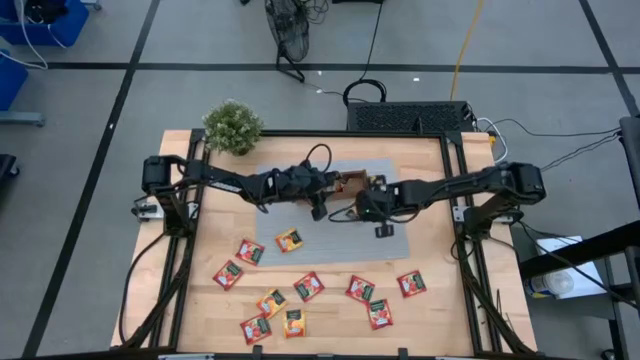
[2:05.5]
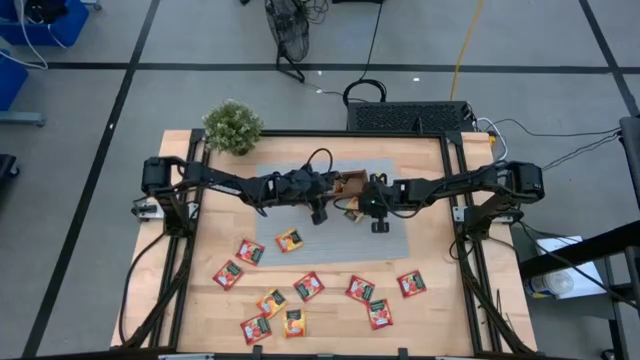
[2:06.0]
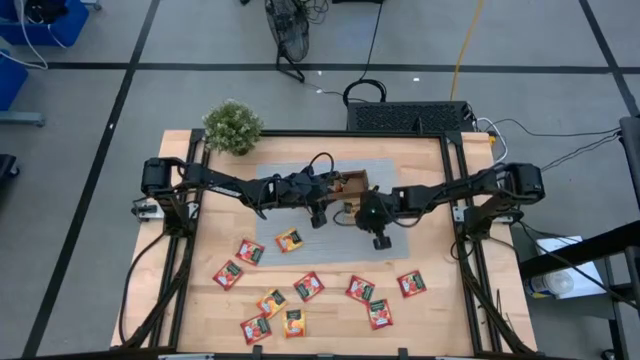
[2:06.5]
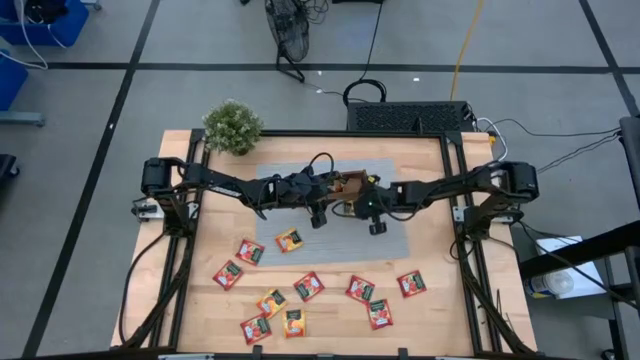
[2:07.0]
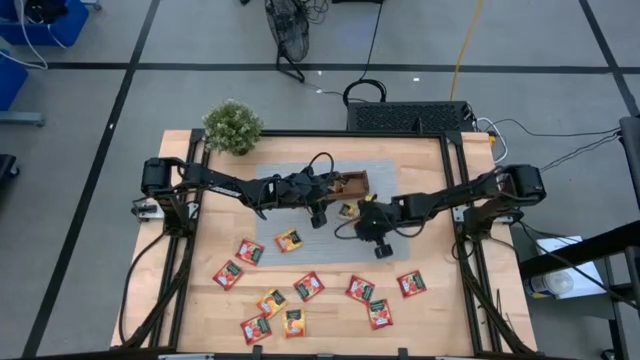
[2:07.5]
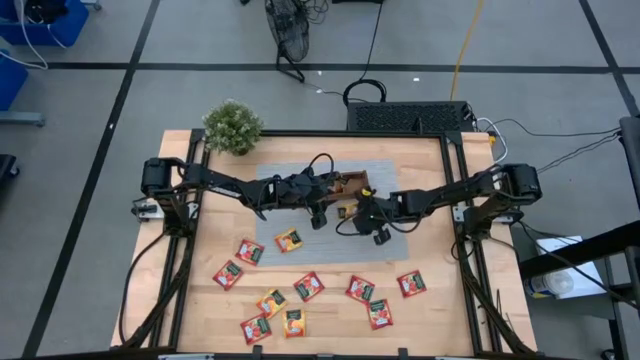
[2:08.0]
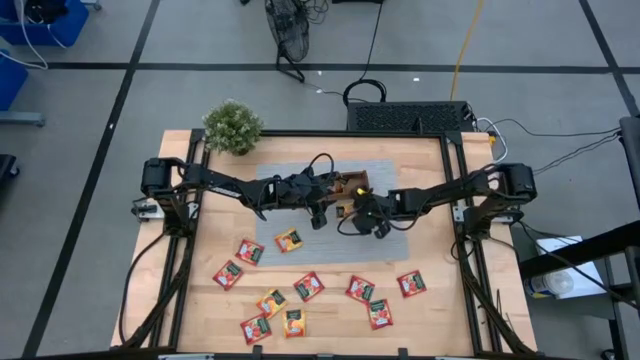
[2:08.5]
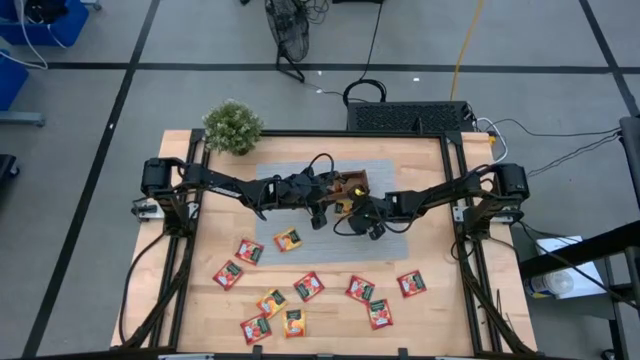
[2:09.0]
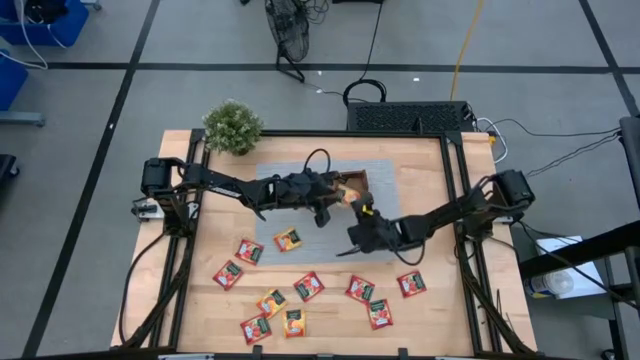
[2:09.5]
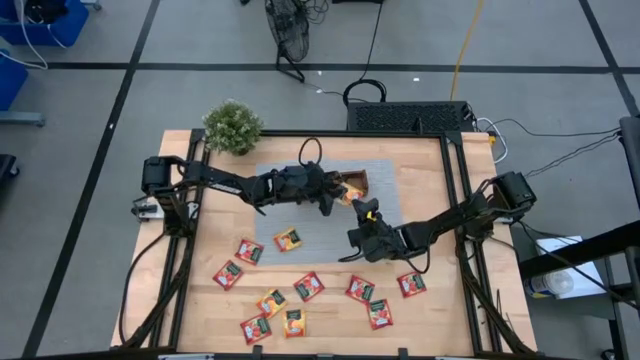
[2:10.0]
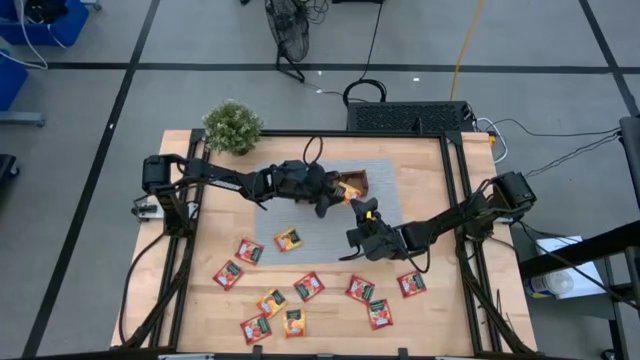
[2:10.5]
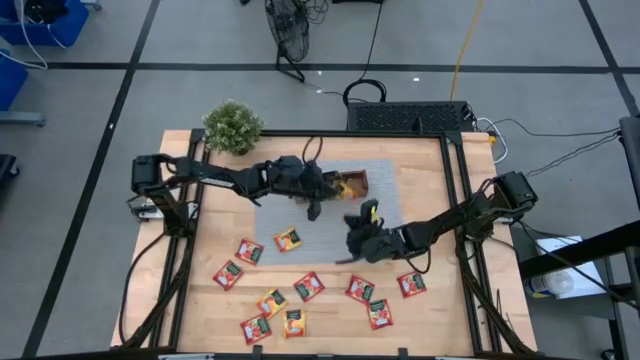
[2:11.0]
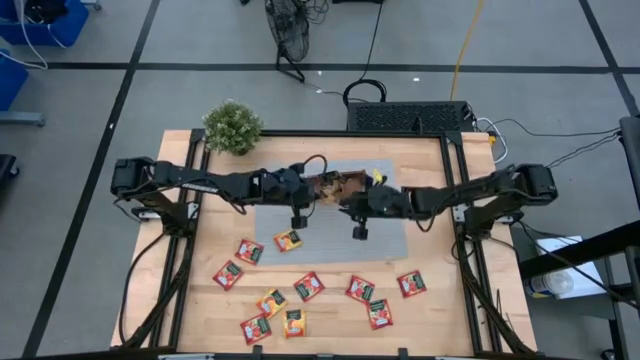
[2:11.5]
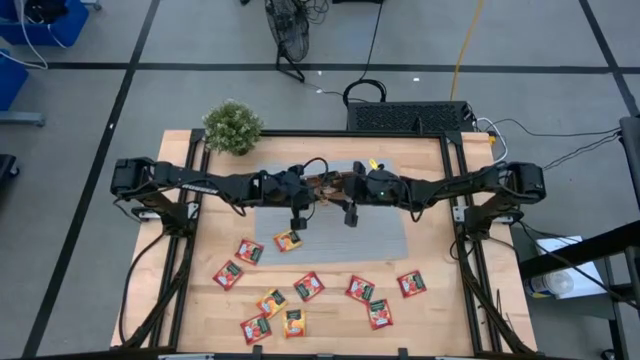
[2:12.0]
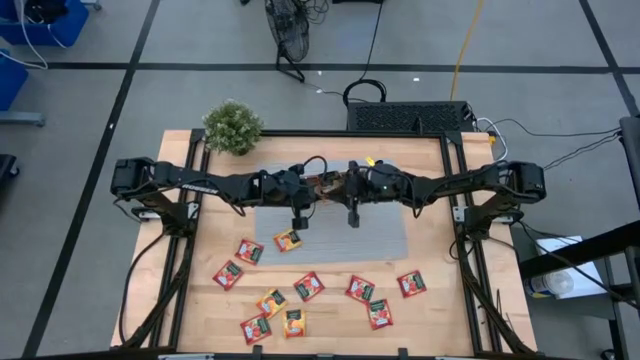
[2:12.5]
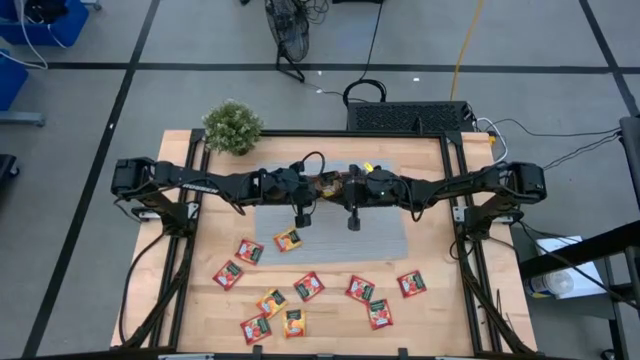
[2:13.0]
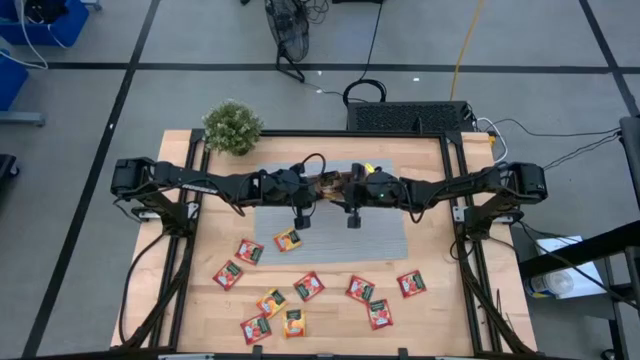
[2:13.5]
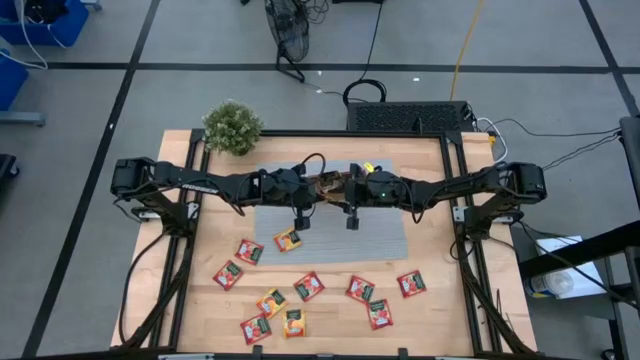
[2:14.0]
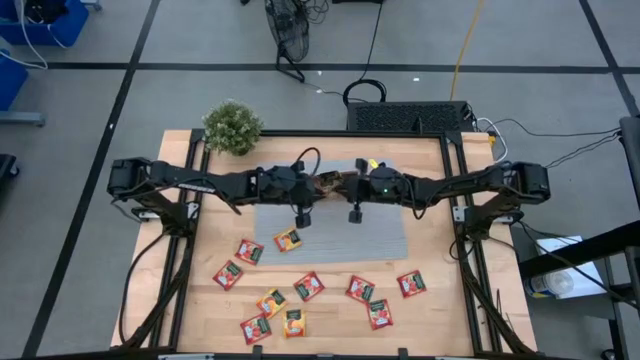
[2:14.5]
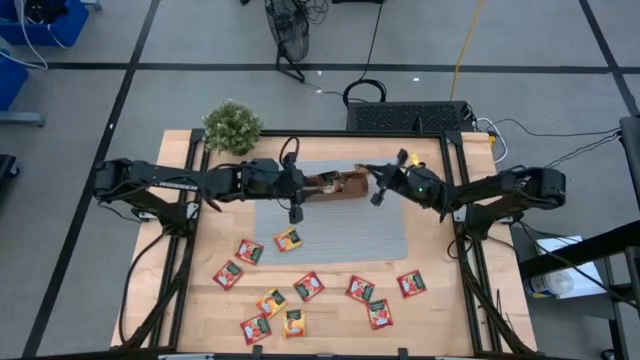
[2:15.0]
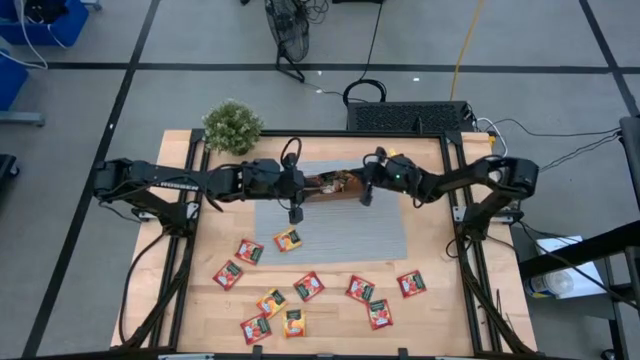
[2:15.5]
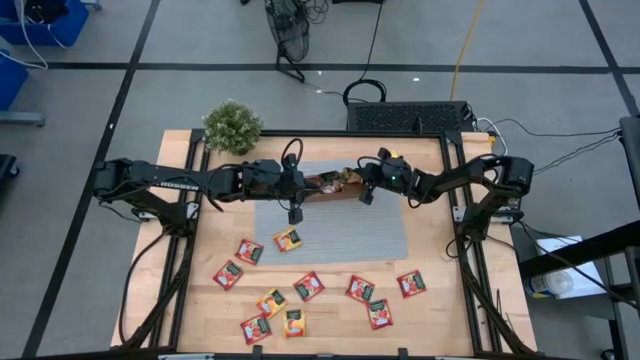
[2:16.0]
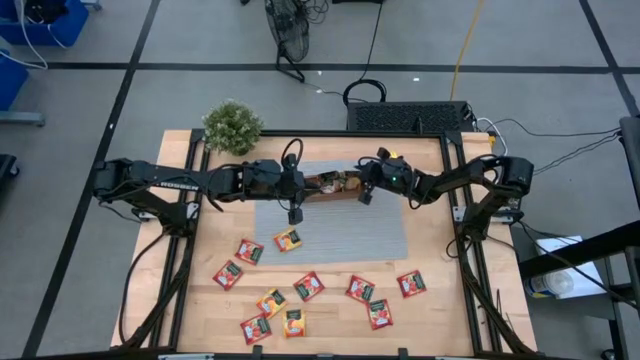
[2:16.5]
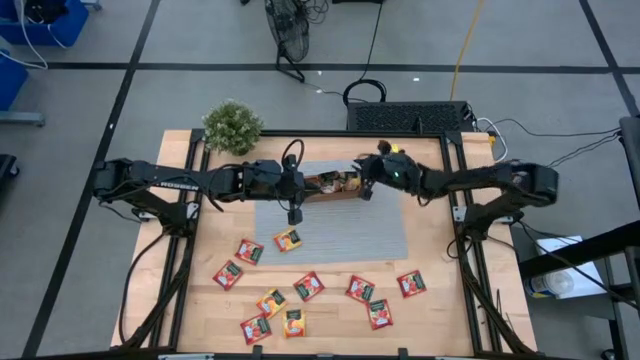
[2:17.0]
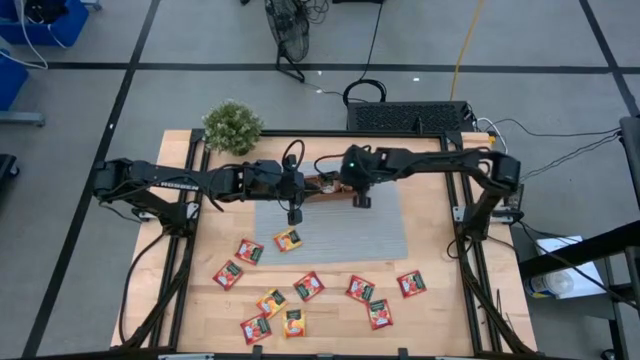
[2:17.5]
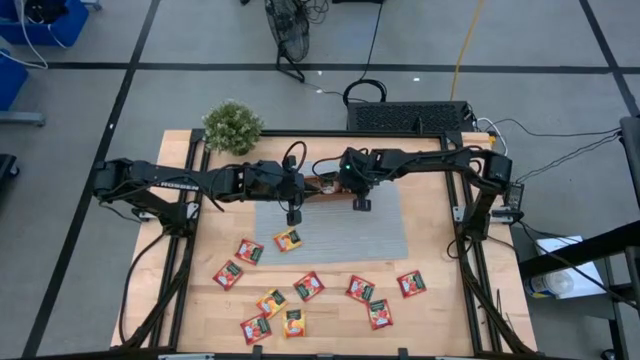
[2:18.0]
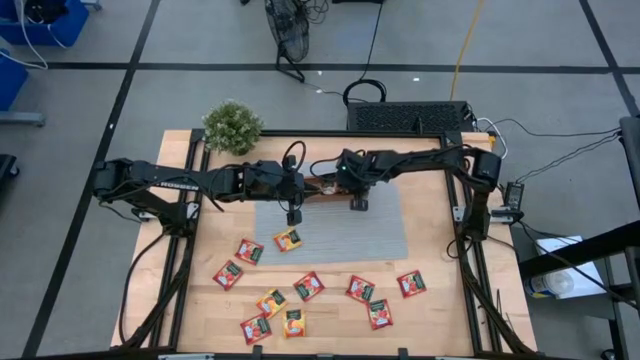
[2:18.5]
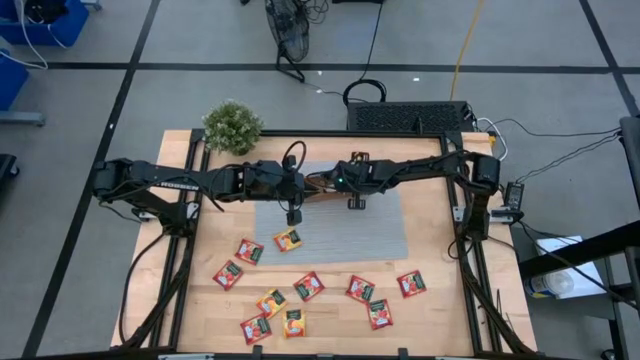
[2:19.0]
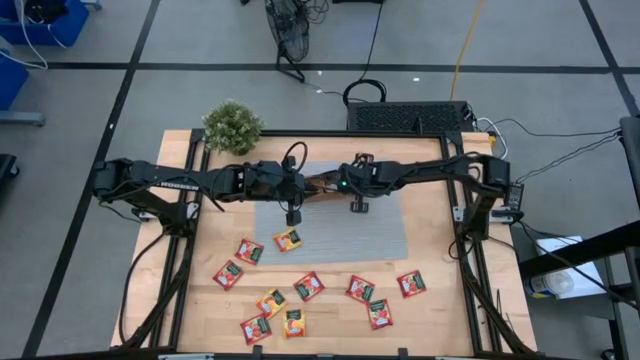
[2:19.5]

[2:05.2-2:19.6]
Task: Pick & Place Tea
Put the yellow tea bag into the right section of the wooden organizer

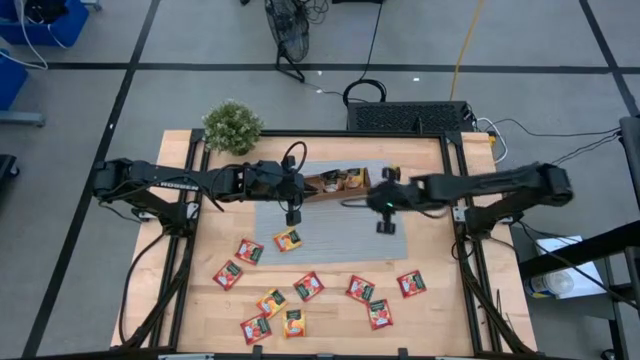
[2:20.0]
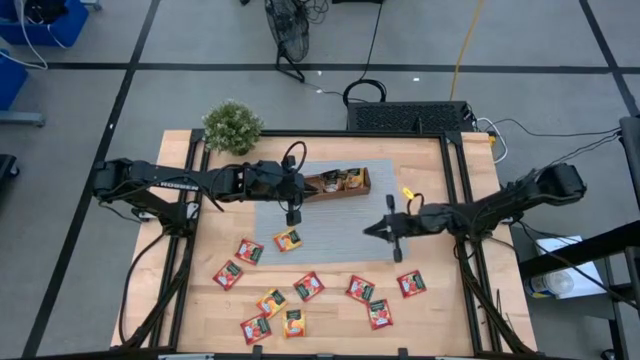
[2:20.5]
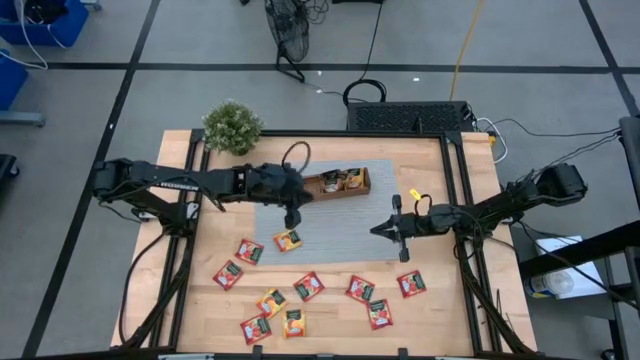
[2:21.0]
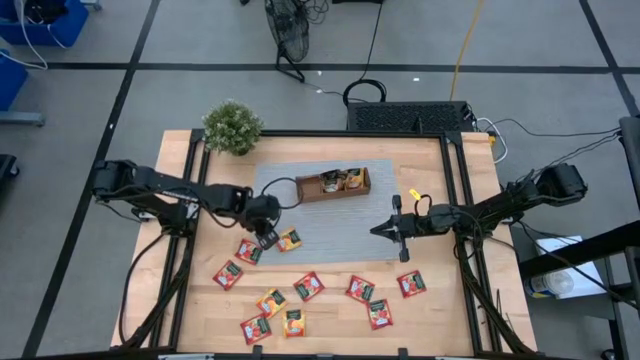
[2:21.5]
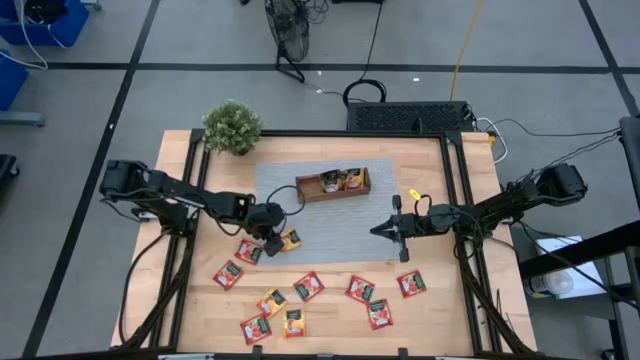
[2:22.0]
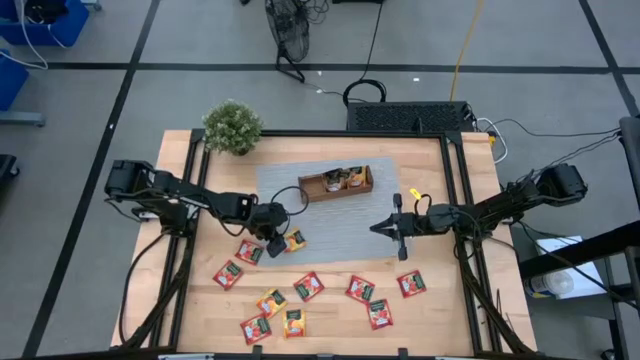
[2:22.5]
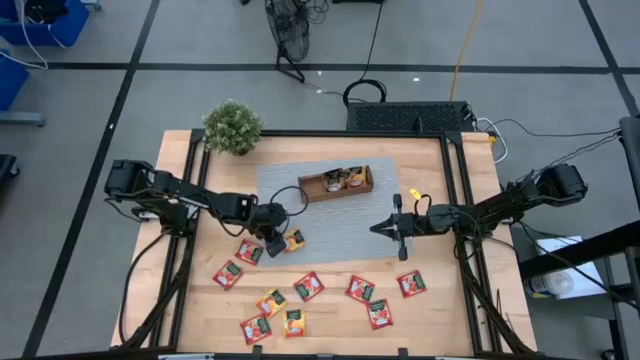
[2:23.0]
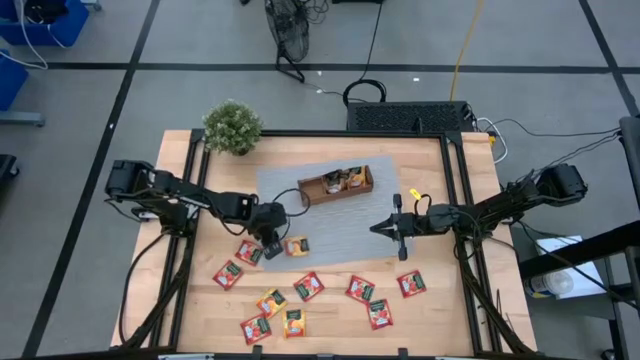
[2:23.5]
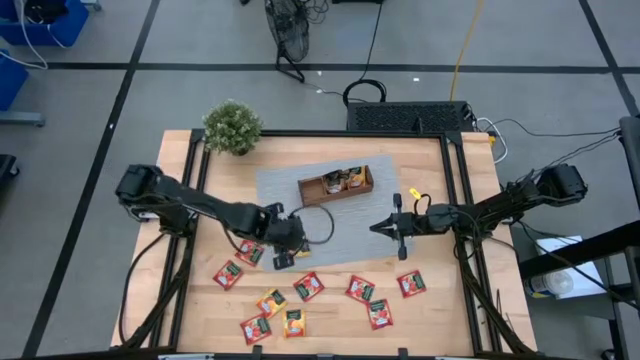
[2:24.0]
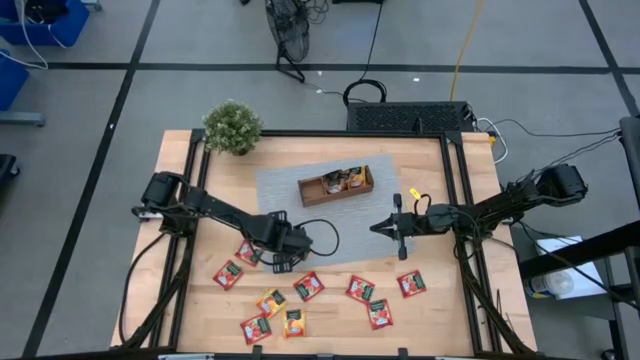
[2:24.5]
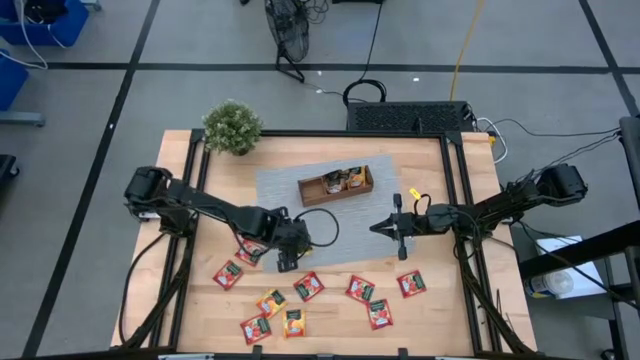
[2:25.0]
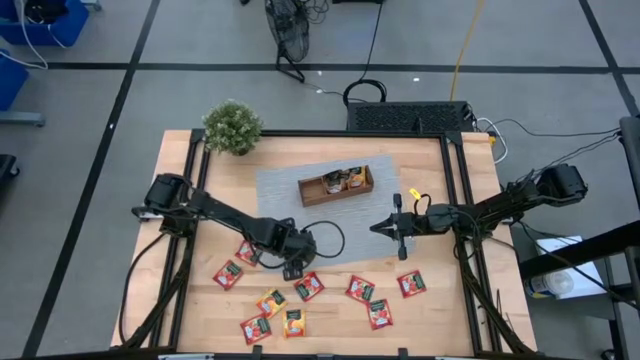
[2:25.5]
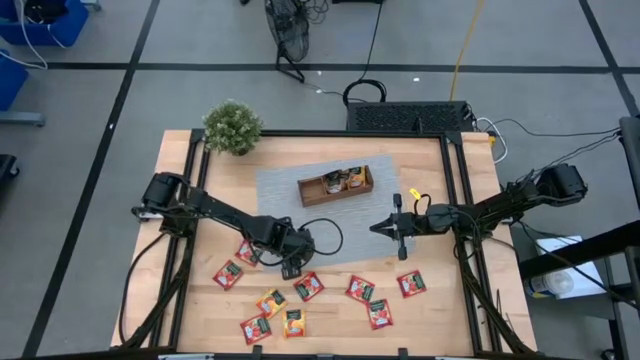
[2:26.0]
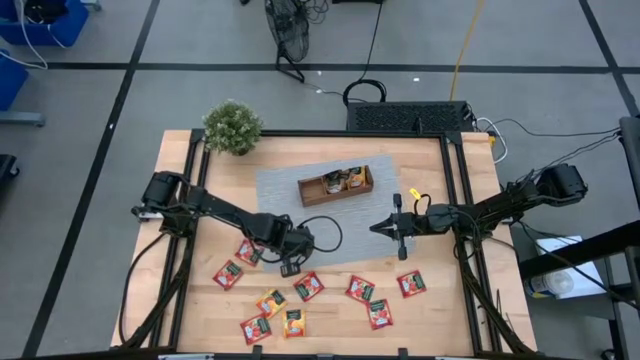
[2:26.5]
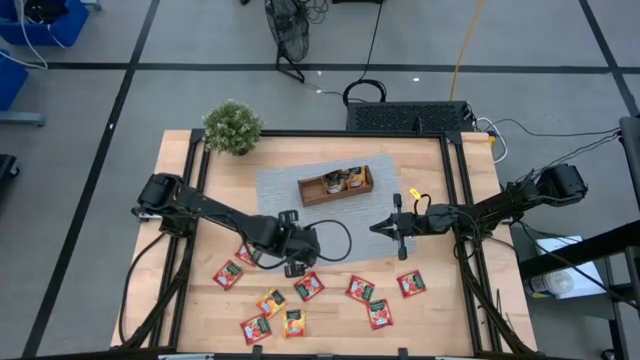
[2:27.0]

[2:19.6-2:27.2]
Put the yellow tea bag into the right section of the wooden organizer
